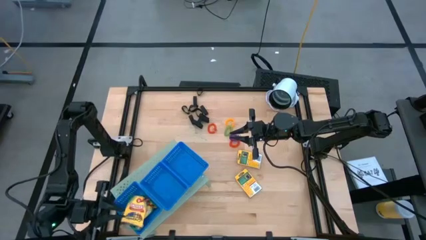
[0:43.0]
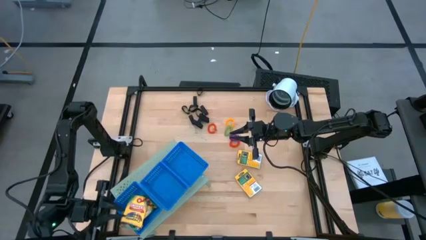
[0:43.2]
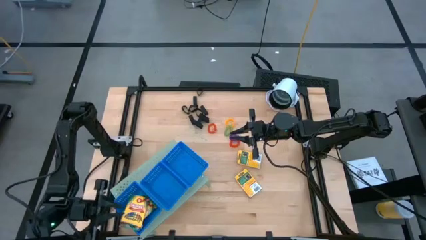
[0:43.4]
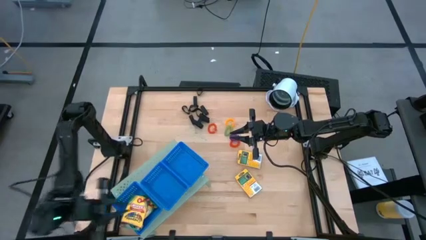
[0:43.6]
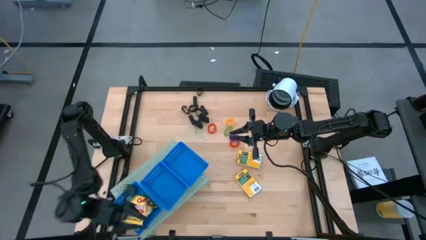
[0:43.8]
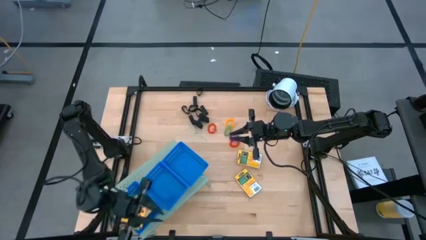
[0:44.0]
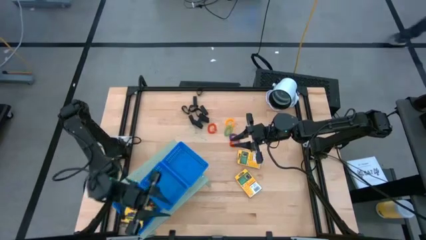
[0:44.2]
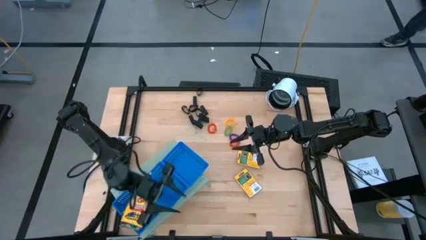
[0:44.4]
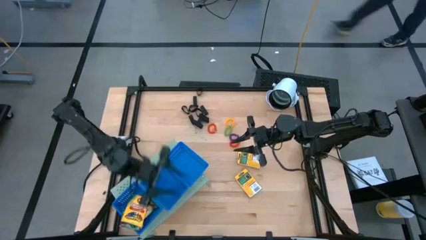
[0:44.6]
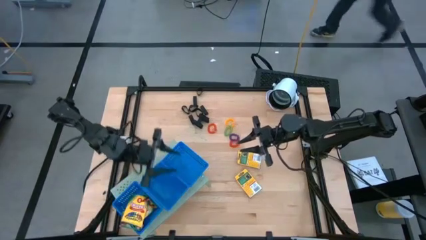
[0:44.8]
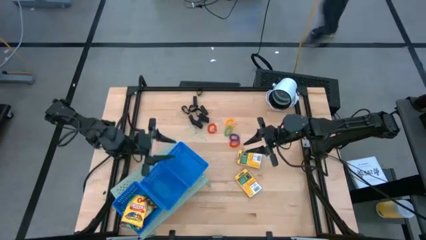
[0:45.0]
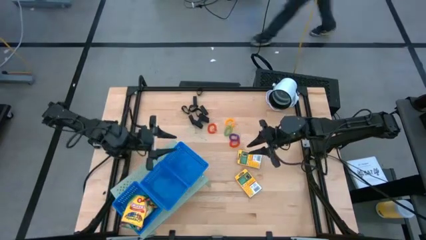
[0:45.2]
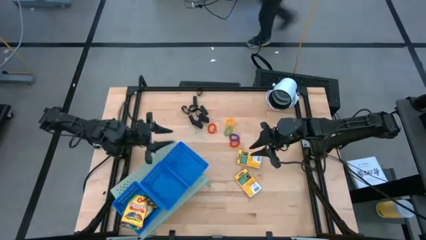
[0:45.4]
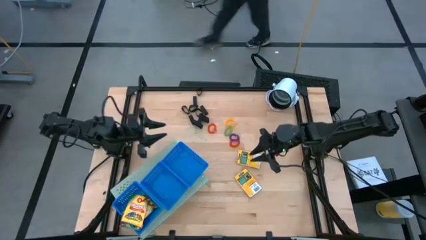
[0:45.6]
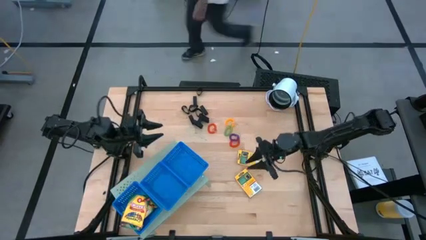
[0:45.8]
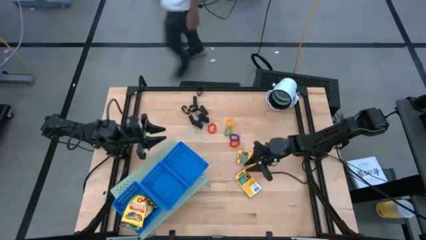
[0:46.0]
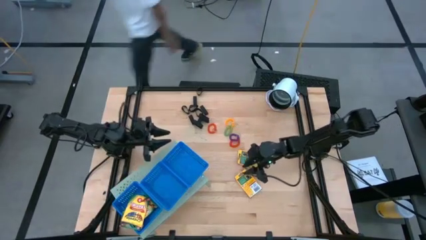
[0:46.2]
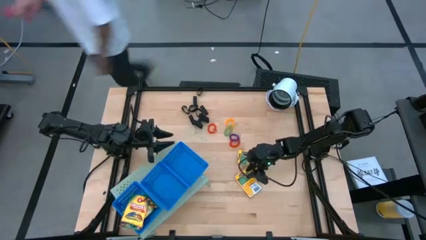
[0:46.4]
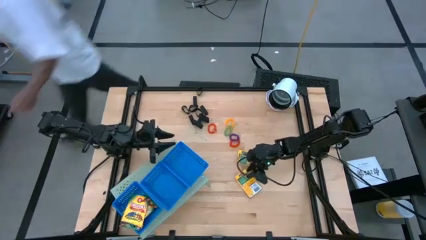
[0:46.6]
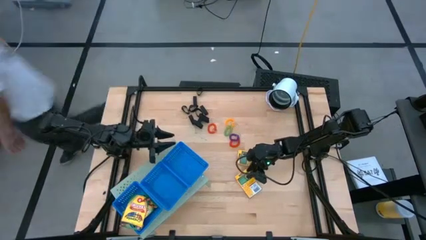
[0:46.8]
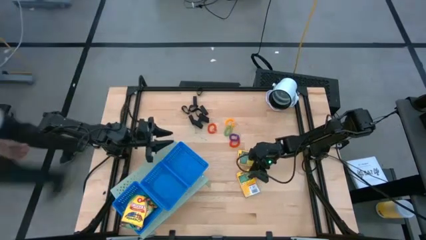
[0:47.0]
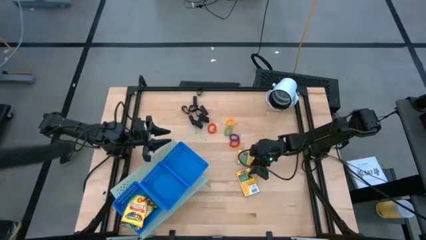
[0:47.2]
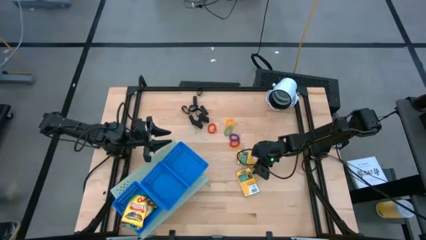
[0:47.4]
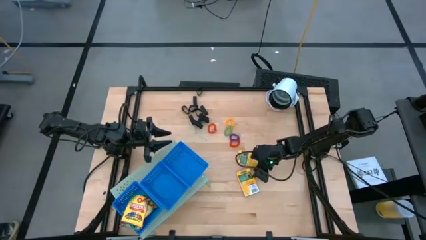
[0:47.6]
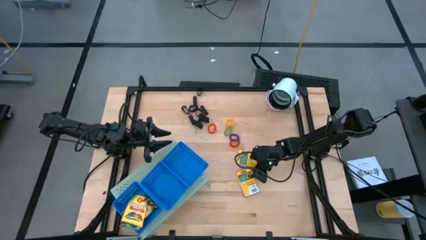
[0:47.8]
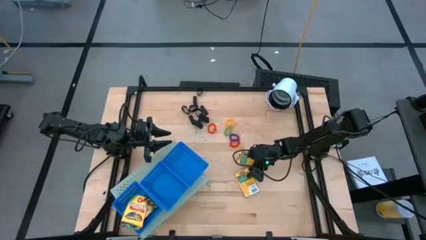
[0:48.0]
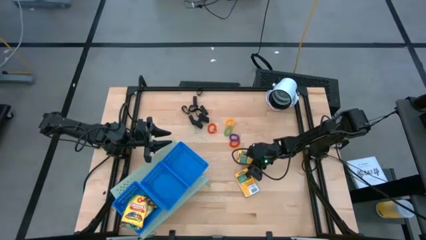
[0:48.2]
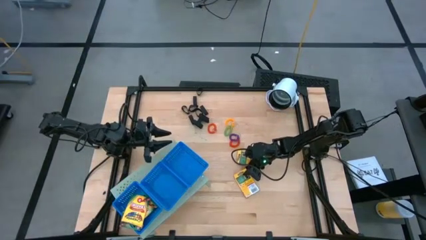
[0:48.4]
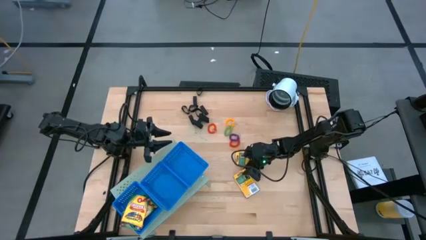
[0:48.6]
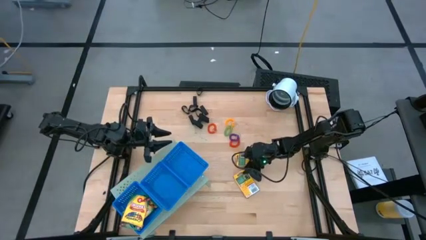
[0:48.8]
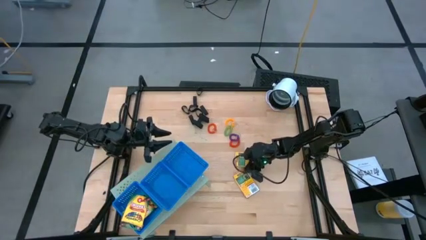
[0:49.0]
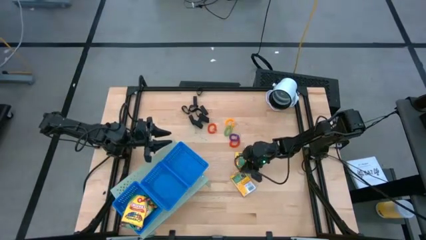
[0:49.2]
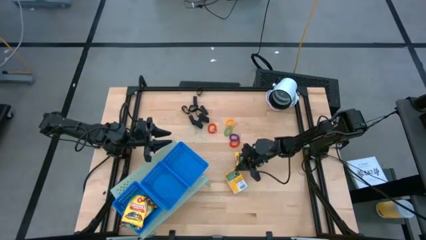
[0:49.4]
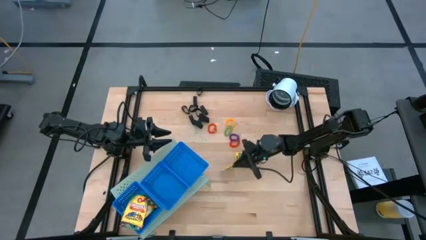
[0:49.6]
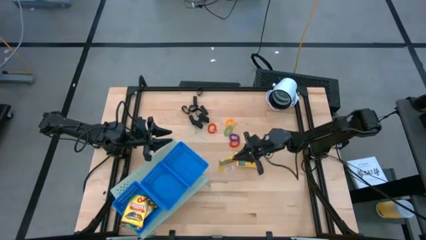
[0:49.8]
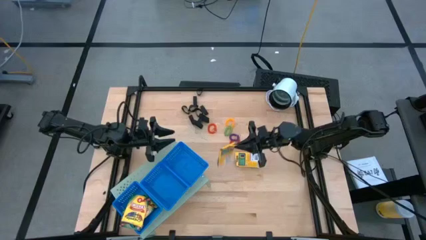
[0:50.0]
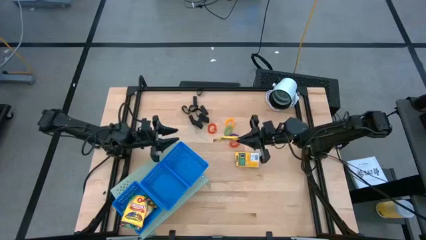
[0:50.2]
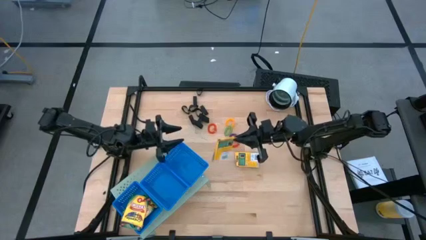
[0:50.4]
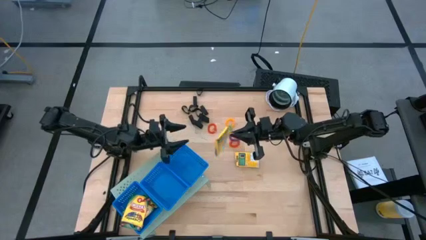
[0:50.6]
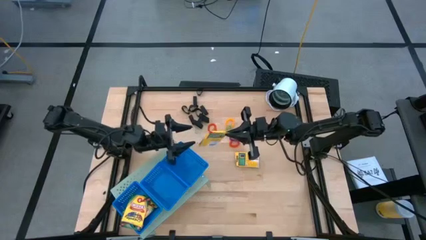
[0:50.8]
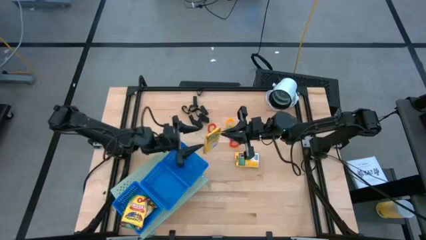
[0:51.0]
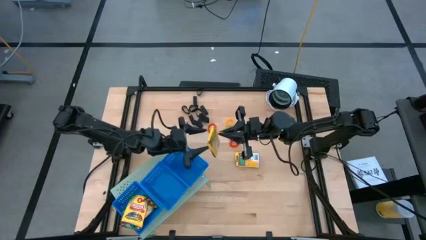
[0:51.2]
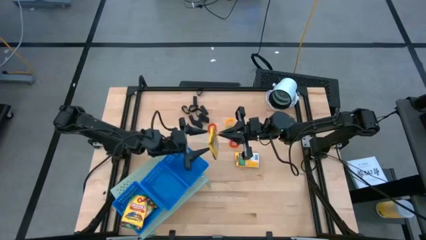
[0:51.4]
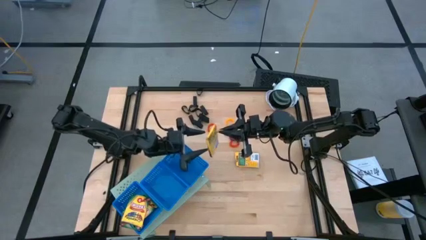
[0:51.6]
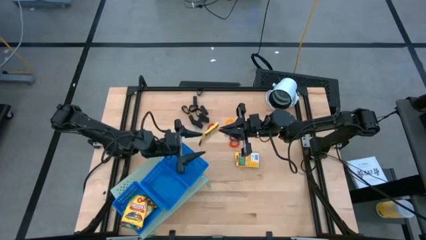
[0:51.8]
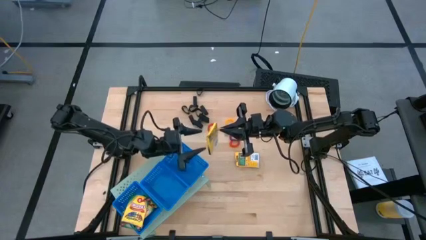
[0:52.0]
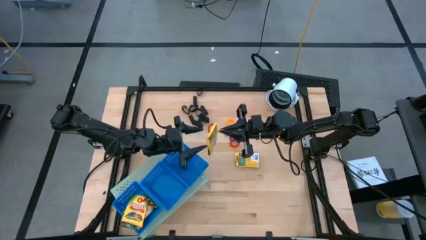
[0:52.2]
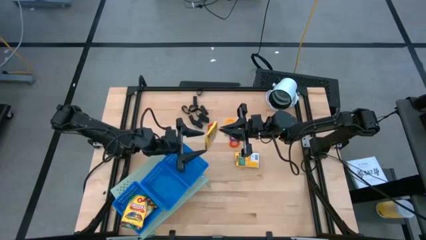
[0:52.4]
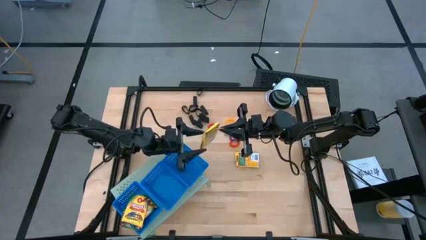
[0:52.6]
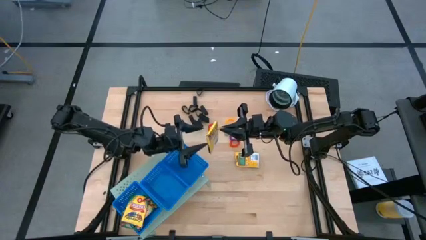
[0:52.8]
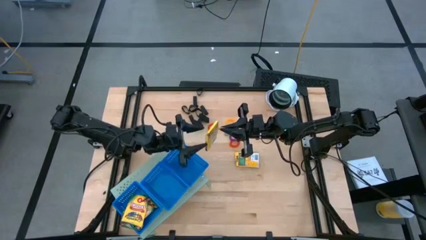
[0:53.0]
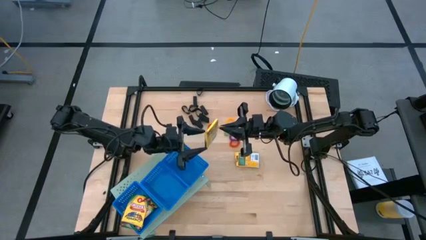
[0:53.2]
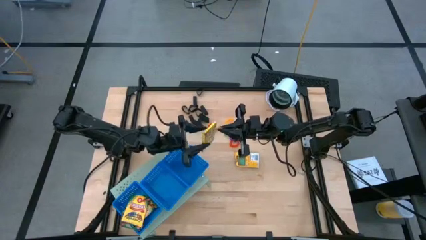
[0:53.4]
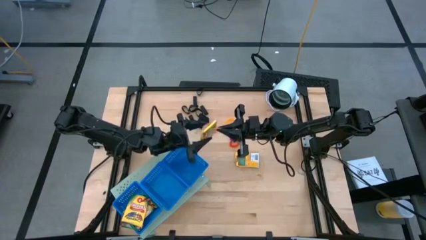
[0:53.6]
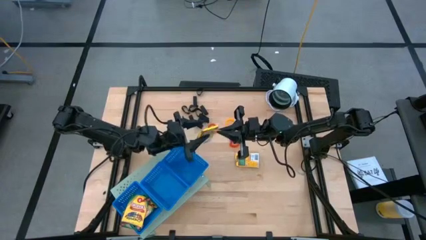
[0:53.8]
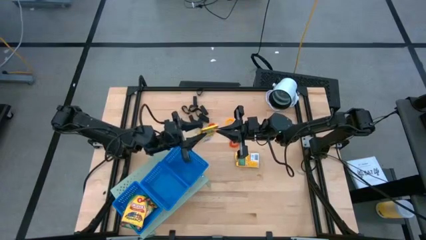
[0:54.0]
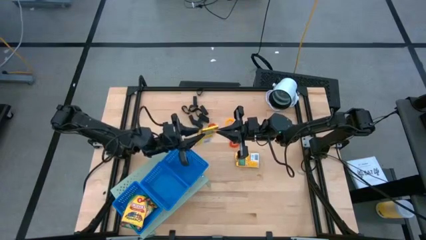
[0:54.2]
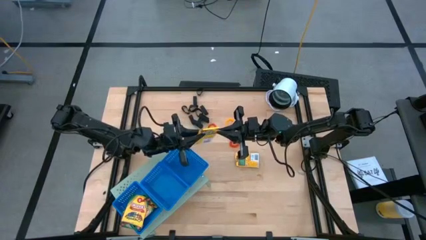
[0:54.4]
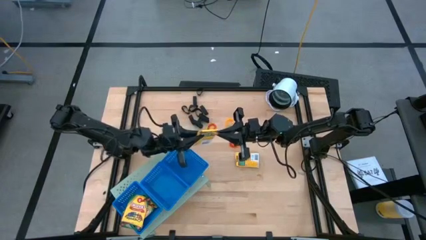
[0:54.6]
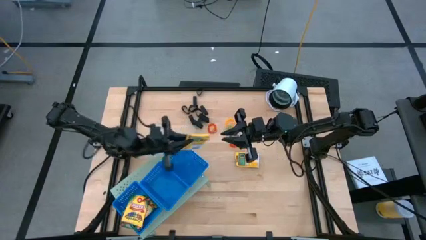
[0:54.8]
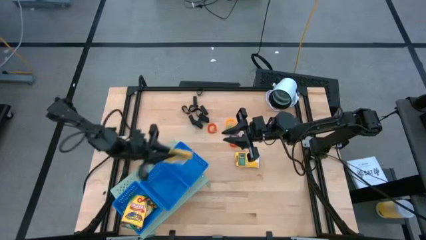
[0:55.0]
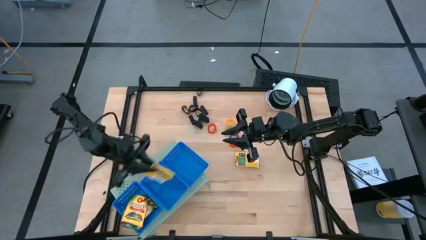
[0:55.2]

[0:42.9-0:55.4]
Task: Pick & Place Office Desk Supplies
Put the yellow crayon box into the bottom blue basket on the shelf
